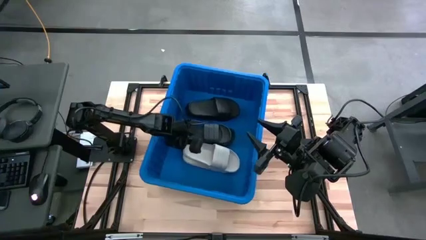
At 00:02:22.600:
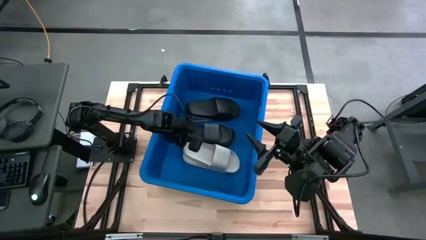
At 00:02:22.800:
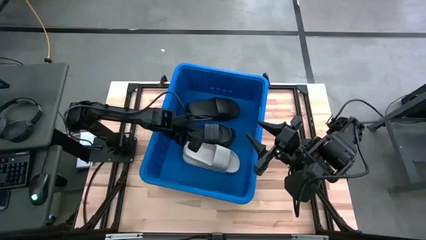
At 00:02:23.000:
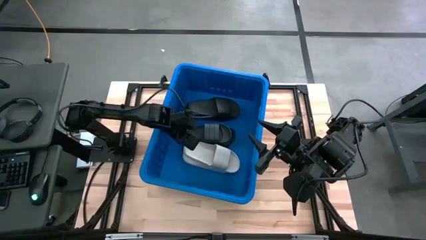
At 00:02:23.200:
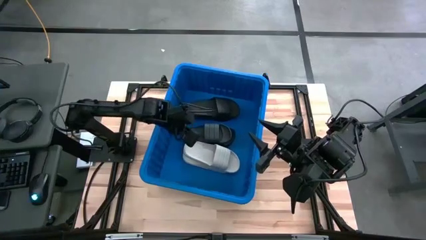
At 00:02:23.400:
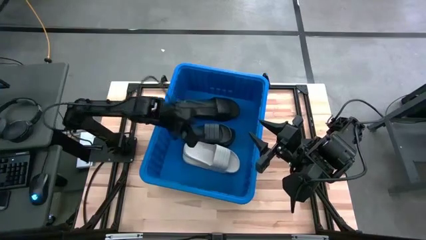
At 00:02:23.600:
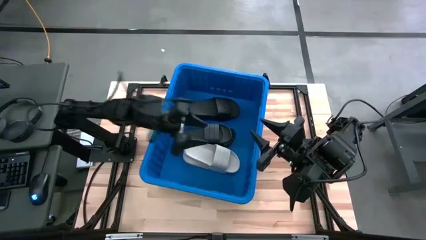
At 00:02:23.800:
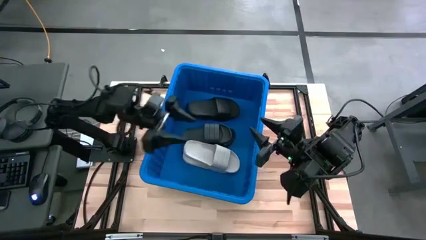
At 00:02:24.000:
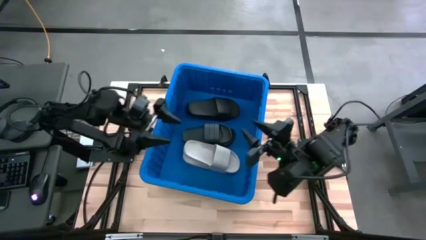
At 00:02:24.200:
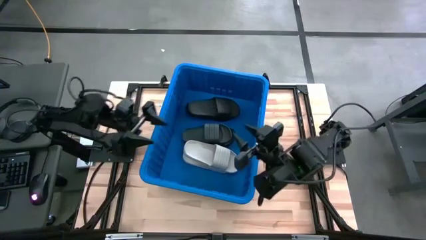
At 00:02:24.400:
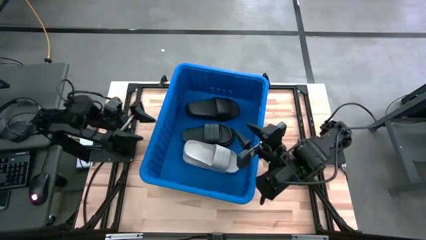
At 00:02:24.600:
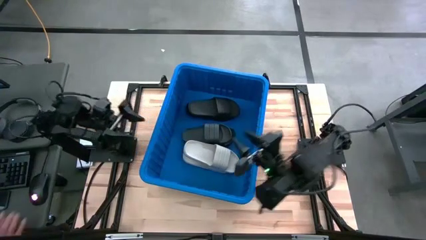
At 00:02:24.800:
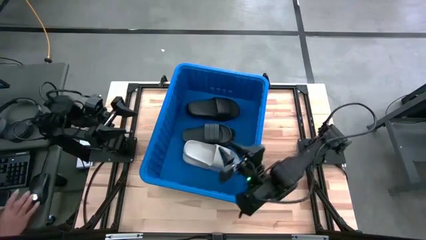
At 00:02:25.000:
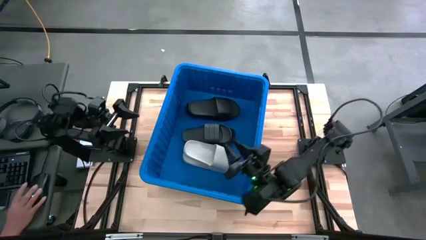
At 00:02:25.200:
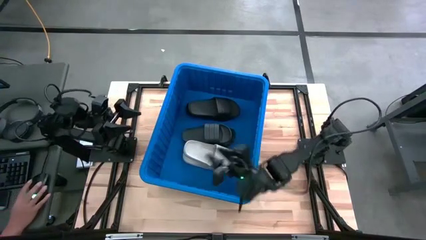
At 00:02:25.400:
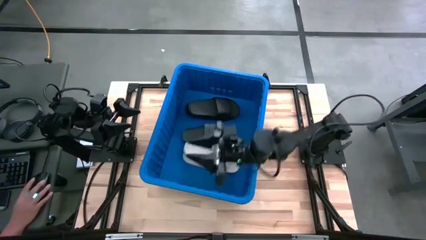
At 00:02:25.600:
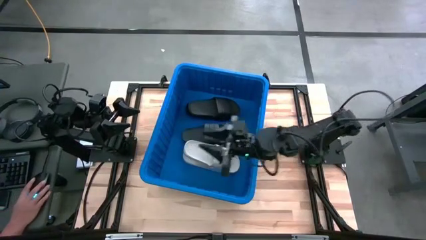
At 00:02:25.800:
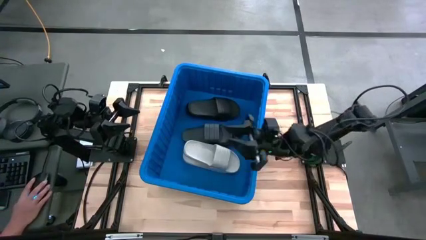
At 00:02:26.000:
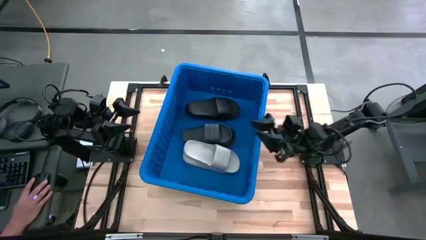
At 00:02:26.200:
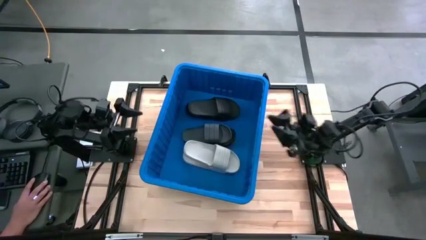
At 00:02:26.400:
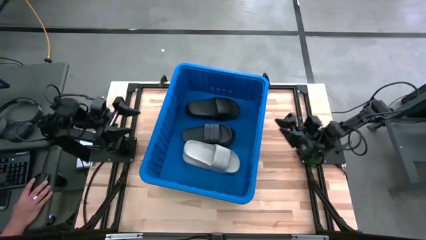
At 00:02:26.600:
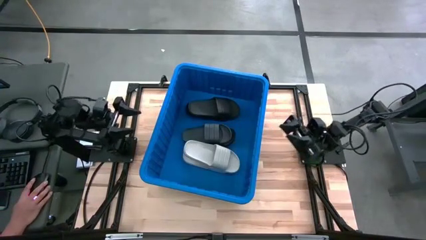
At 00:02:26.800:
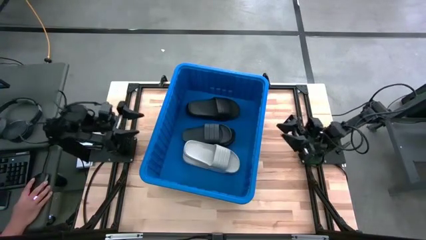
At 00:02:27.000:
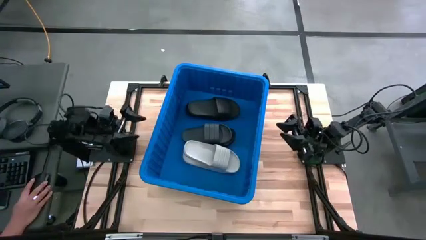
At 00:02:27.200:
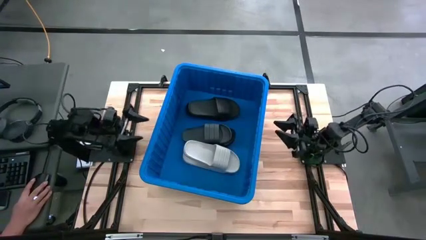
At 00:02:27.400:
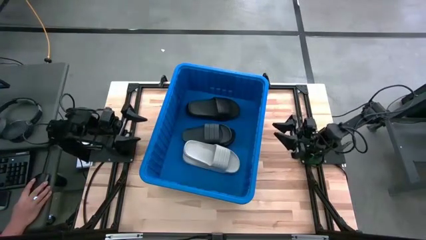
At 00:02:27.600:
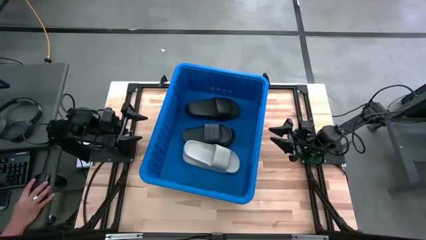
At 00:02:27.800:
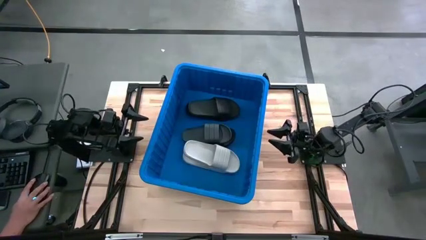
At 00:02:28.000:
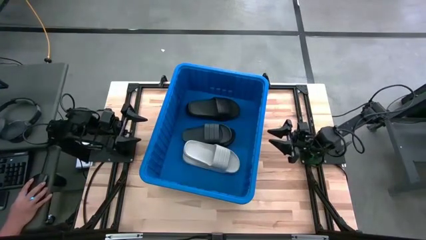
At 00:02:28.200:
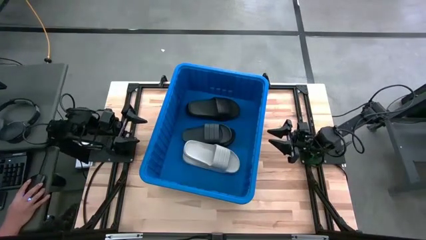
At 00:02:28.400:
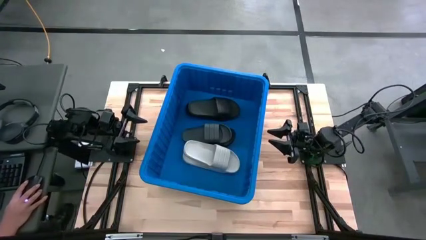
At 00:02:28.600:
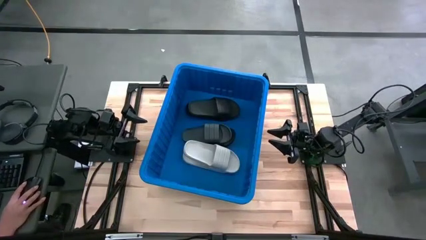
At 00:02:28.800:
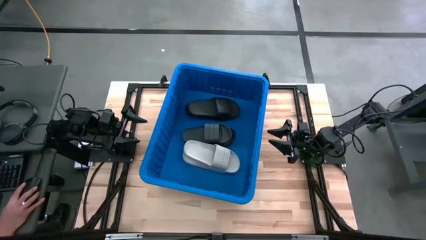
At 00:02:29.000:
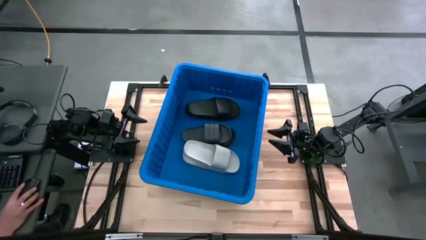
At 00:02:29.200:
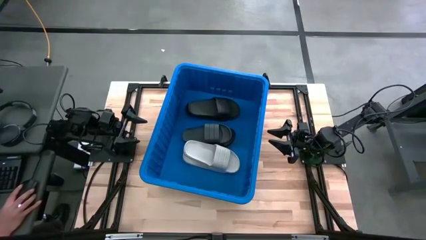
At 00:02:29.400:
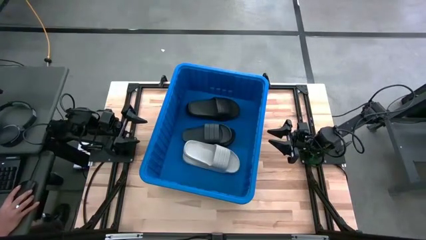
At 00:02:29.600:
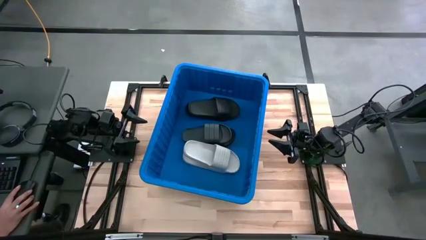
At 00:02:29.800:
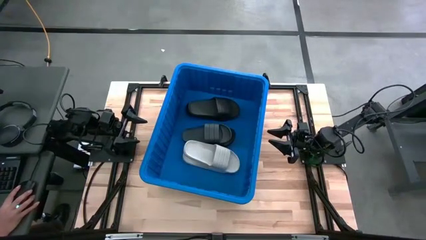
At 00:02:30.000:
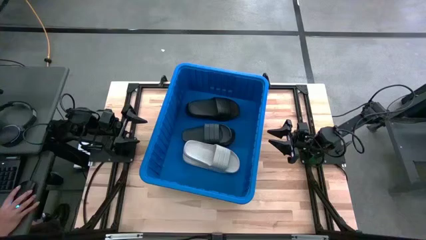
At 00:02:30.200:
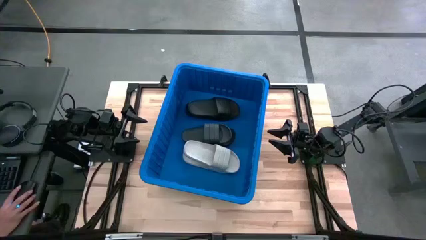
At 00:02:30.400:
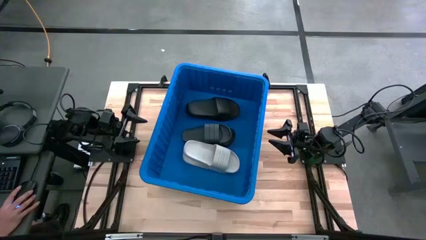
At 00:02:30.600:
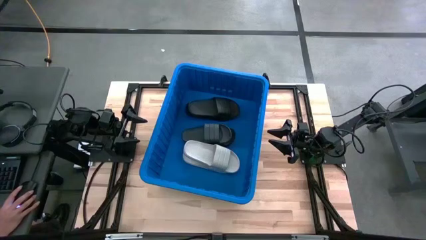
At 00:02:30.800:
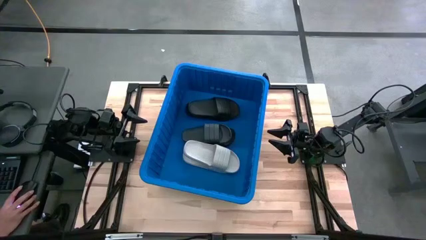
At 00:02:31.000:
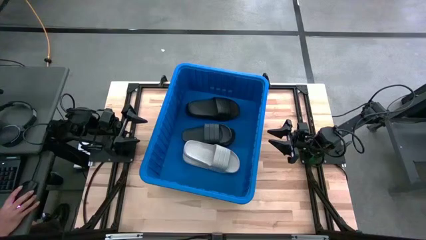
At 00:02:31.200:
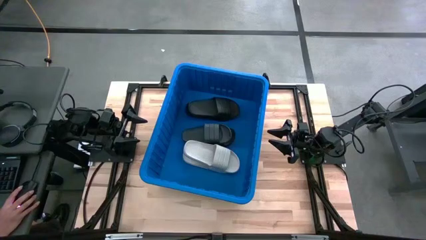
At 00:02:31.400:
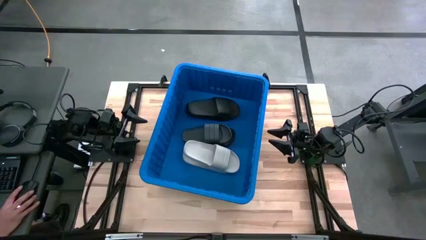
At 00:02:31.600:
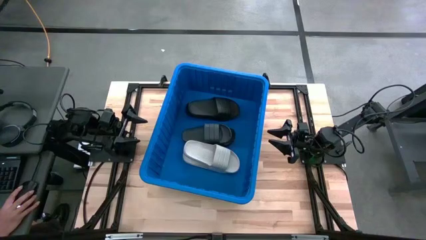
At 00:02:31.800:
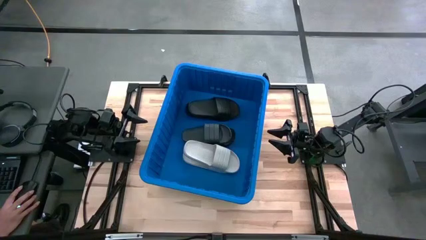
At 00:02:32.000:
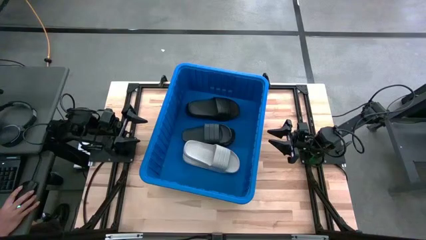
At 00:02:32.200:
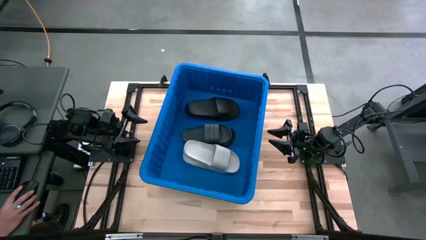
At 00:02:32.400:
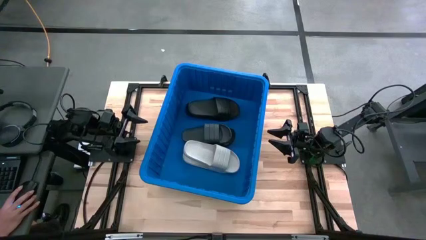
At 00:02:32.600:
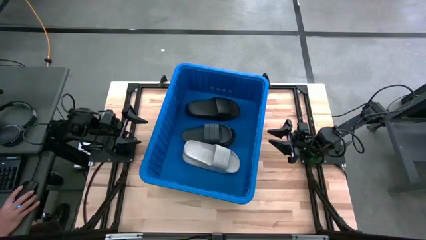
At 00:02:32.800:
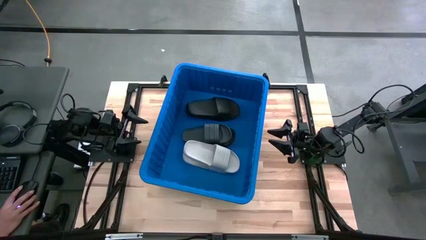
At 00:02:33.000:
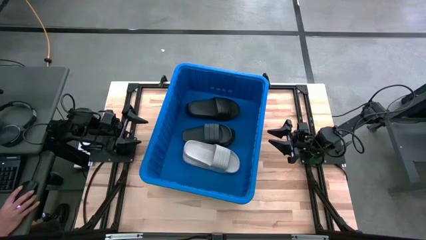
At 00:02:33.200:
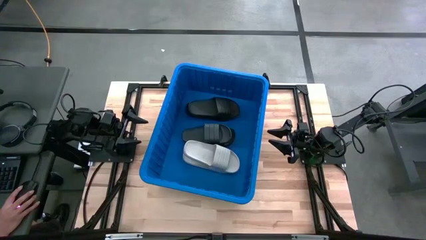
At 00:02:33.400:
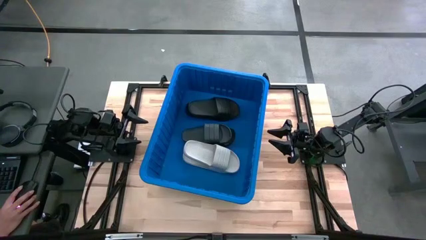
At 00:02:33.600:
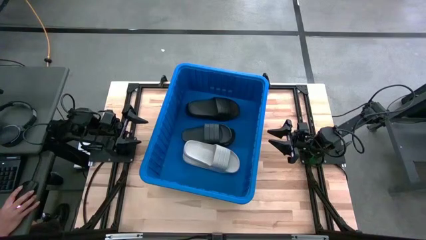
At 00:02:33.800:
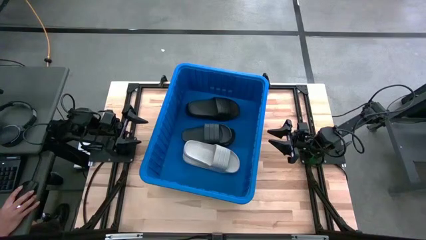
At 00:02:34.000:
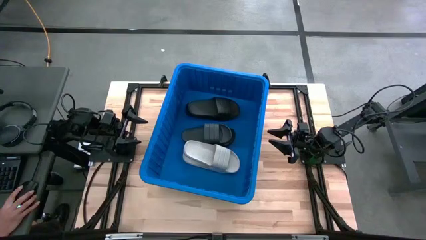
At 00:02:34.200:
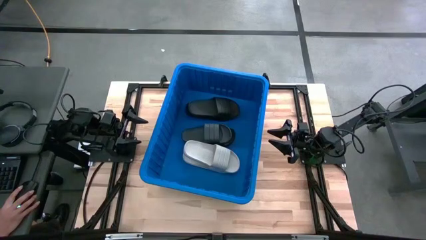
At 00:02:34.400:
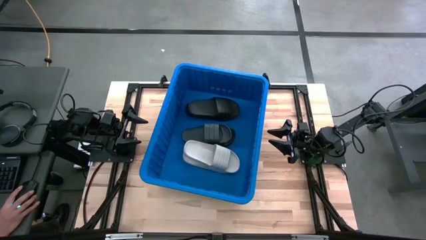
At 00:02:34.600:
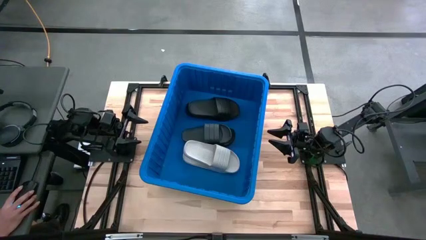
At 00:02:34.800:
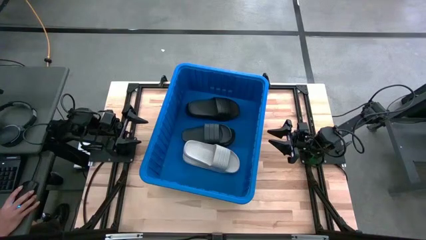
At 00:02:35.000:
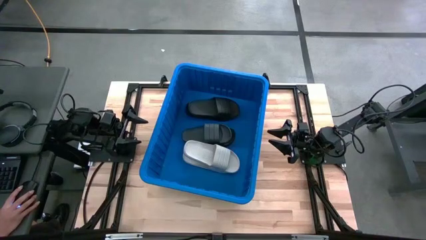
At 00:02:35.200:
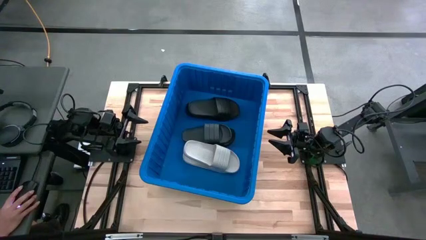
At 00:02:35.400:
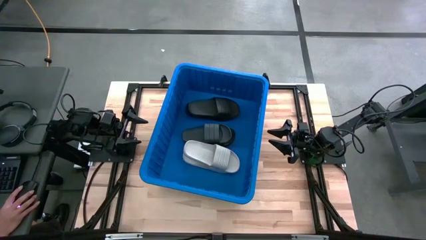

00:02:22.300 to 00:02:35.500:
Task: Pick and place slides into bin
Return to Home Position

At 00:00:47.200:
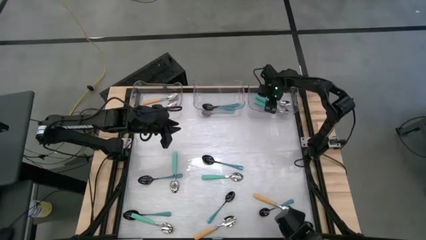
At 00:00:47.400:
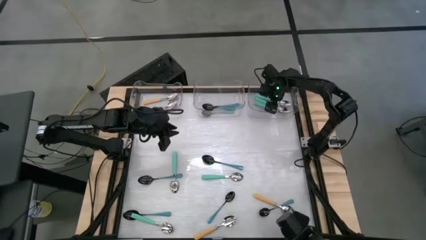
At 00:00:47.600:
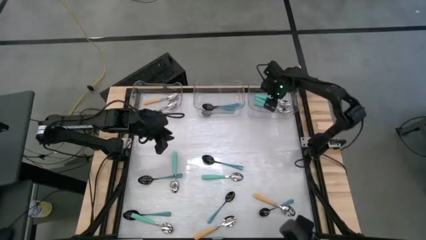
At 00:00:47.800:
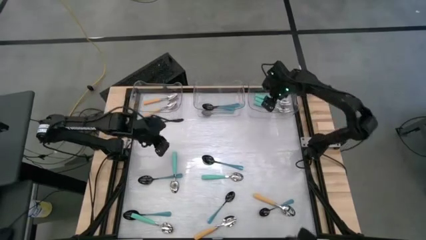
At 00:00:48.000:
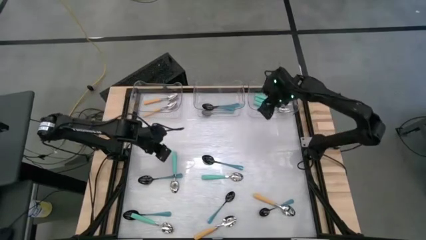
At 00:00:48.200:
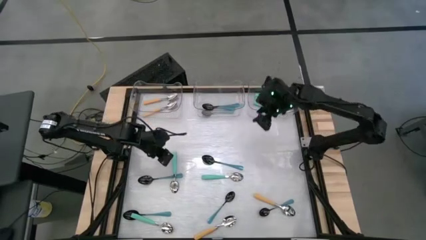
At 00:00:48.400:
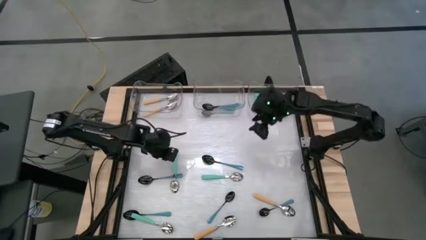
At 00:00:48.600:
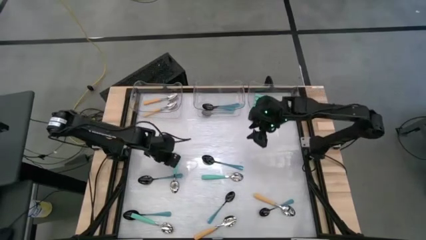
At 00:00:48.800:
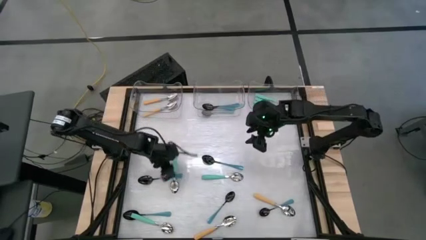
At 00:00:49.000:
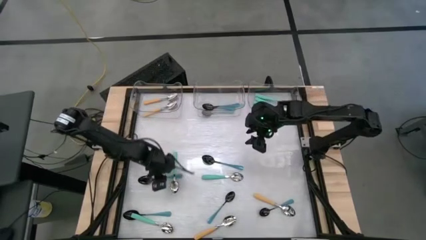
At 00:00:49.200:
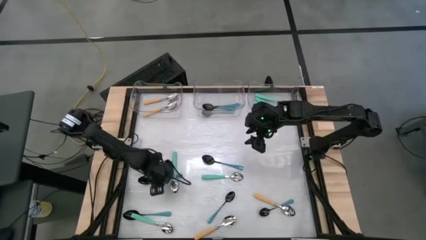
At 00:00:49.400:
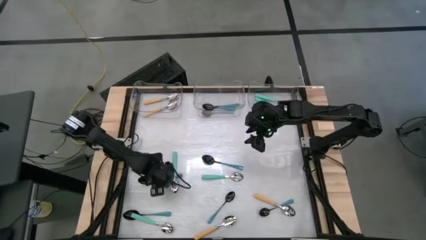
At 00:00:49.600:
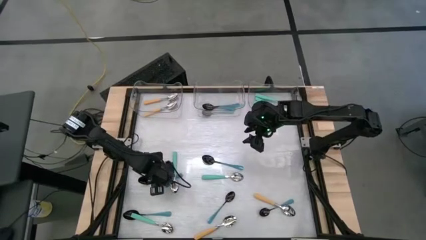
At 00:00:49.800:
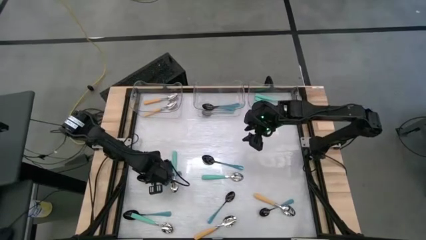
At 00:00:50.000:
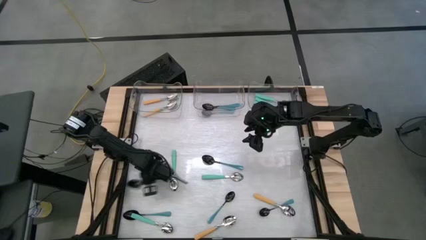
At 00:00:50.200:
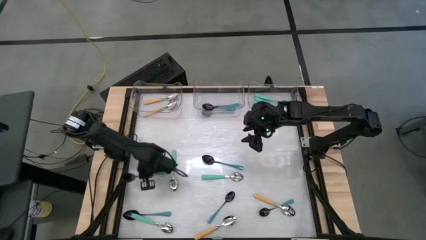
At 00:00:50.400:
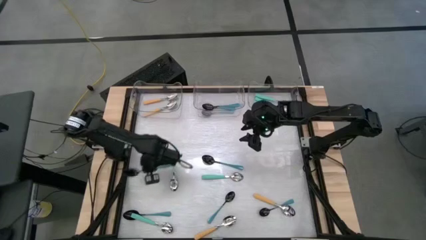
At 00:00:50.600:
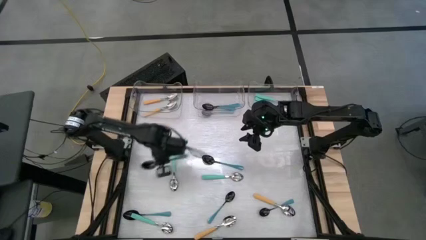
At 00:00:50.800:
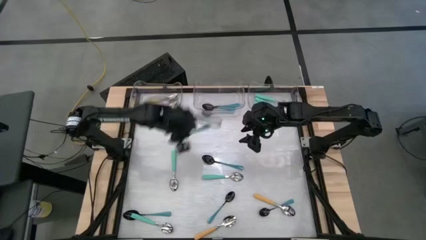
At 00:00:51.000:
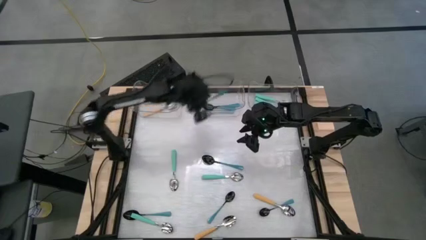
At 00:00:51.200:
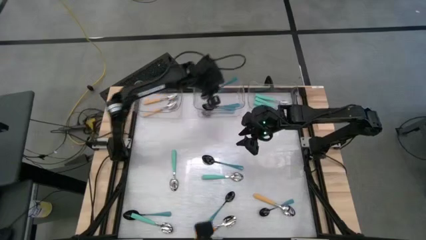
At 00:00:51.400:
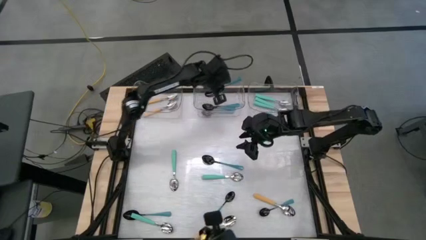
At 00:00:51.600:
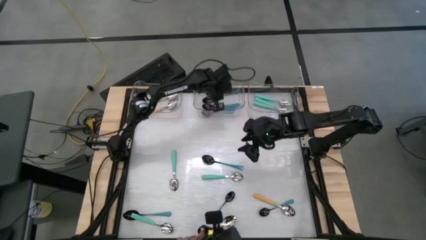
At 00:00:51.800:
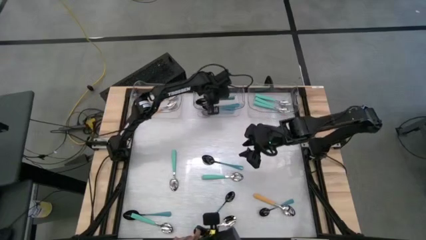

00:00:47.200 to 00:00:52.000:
Task: Sort silverware by color (type)
Put the blue spoon into the middle transparent bin
